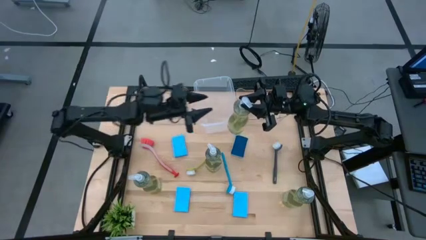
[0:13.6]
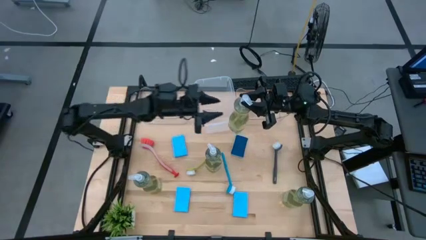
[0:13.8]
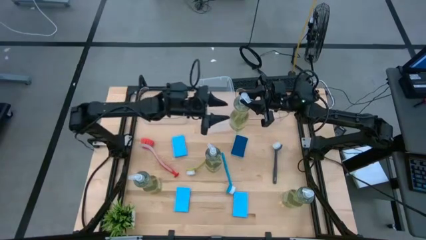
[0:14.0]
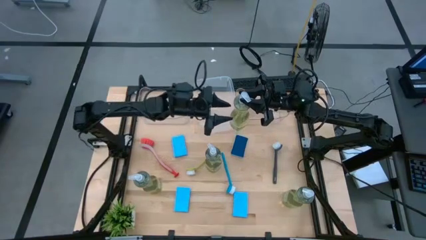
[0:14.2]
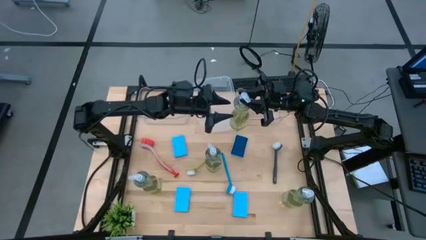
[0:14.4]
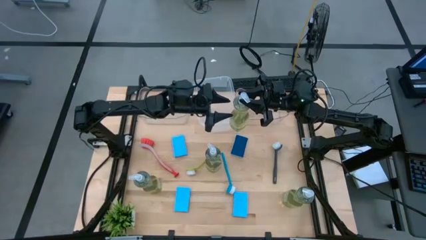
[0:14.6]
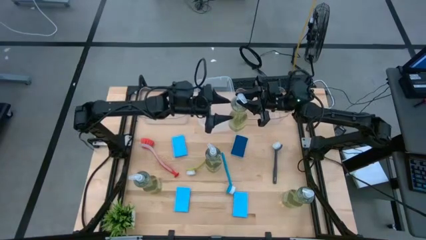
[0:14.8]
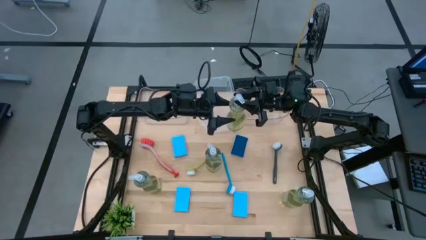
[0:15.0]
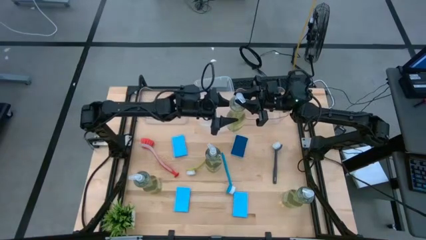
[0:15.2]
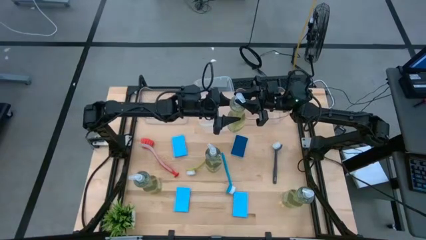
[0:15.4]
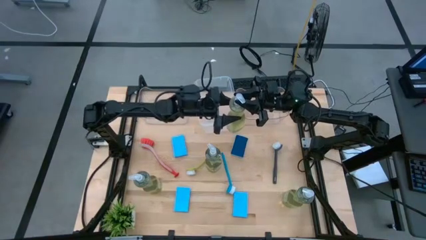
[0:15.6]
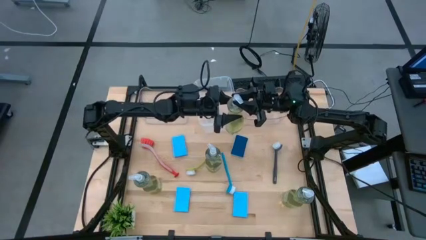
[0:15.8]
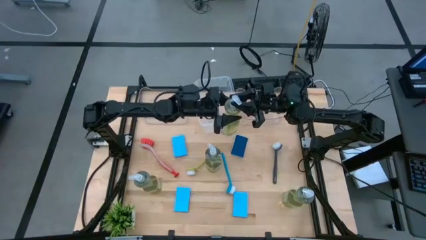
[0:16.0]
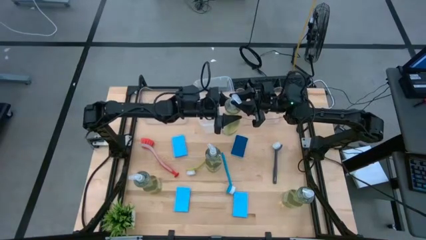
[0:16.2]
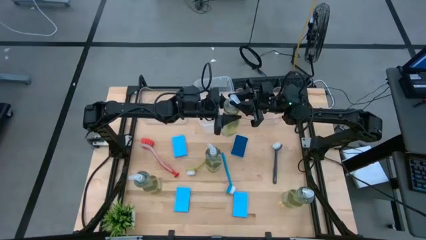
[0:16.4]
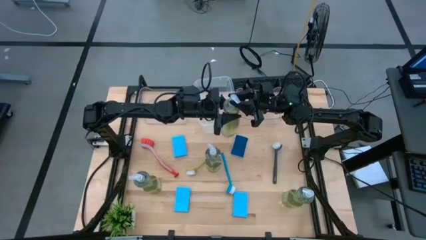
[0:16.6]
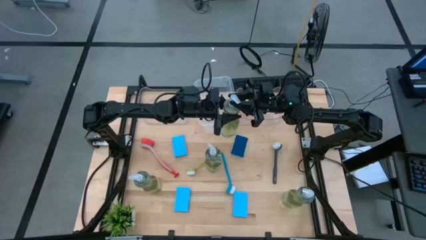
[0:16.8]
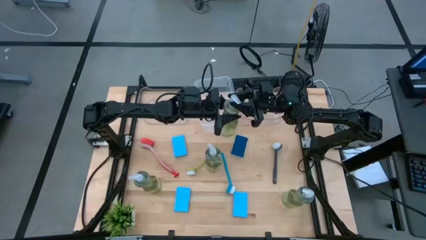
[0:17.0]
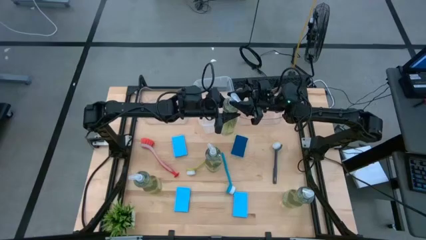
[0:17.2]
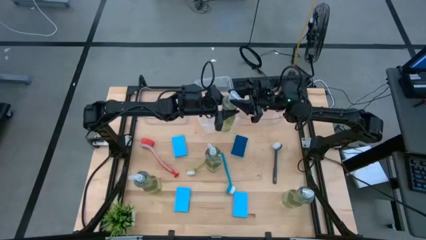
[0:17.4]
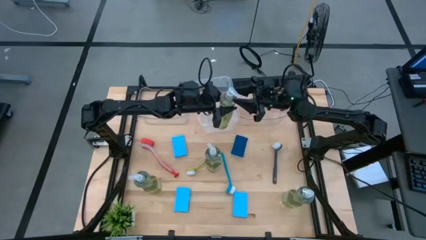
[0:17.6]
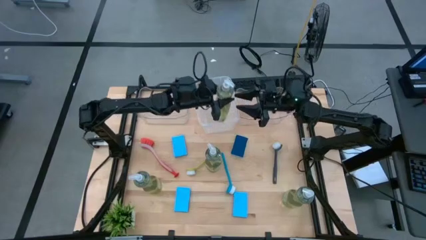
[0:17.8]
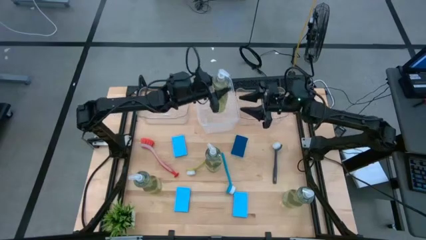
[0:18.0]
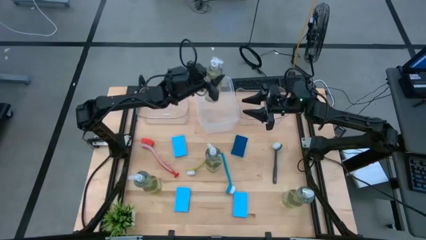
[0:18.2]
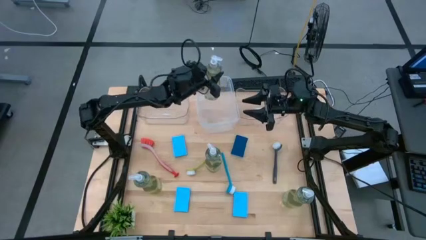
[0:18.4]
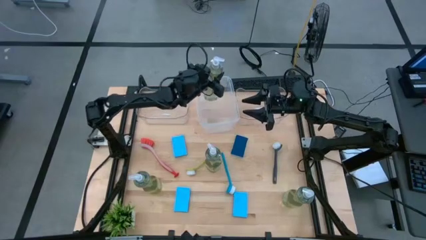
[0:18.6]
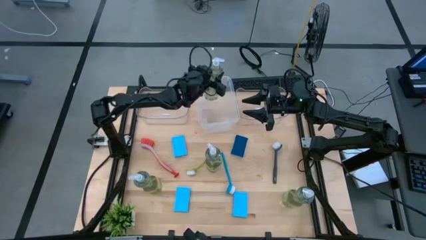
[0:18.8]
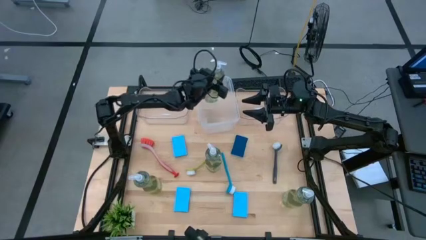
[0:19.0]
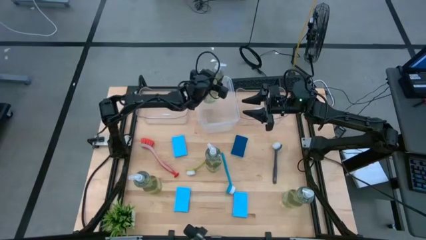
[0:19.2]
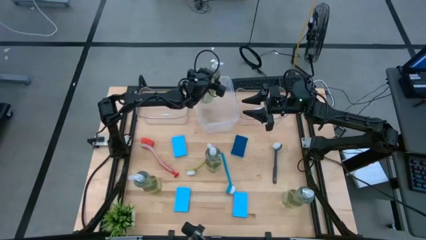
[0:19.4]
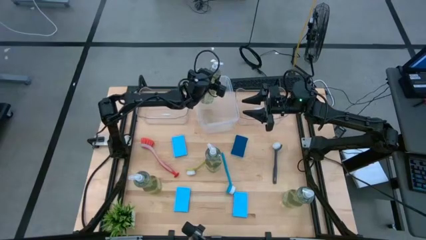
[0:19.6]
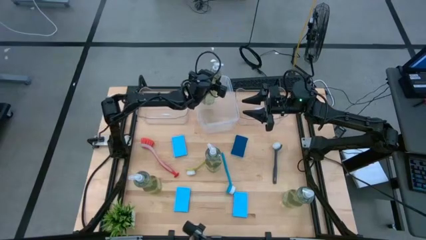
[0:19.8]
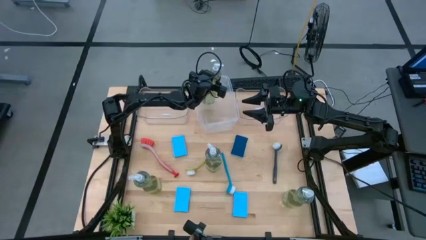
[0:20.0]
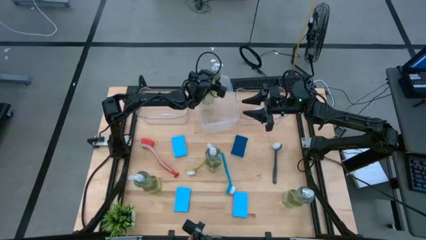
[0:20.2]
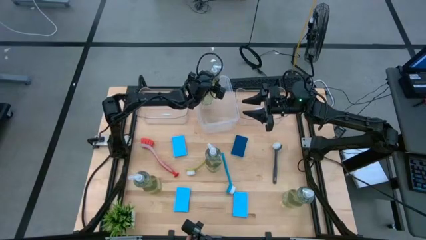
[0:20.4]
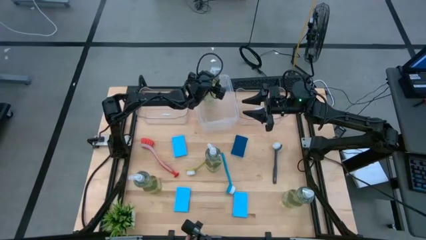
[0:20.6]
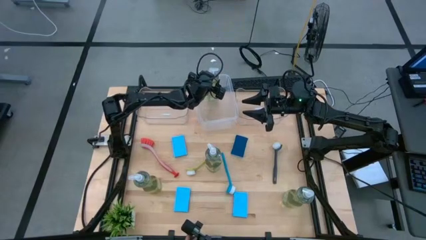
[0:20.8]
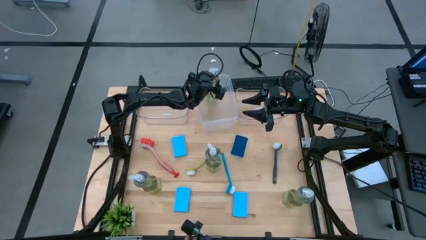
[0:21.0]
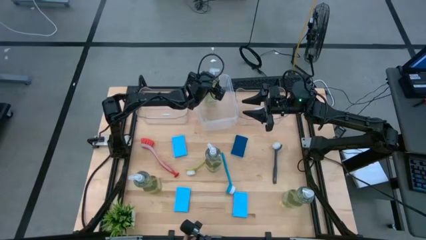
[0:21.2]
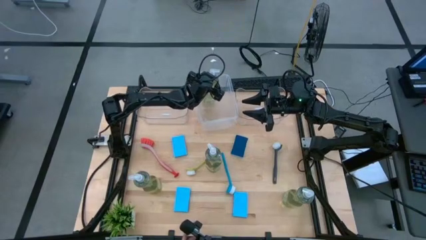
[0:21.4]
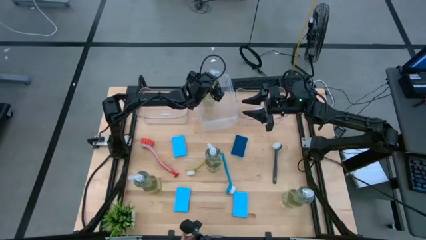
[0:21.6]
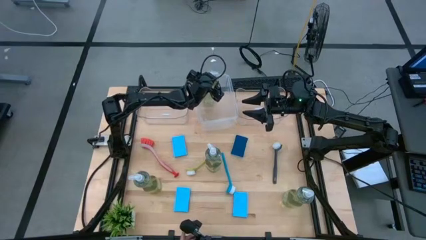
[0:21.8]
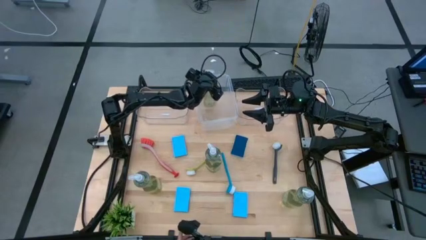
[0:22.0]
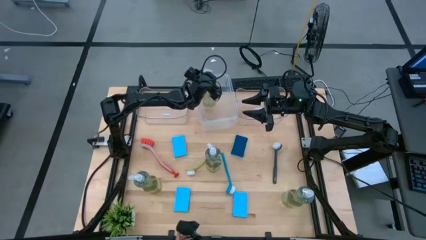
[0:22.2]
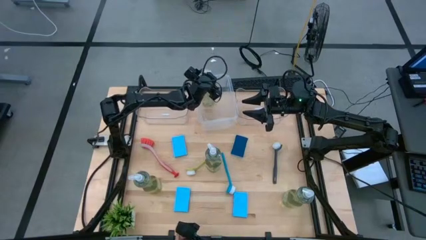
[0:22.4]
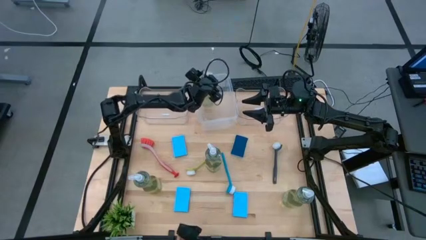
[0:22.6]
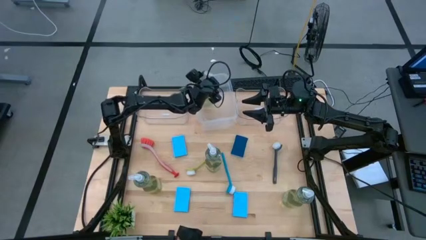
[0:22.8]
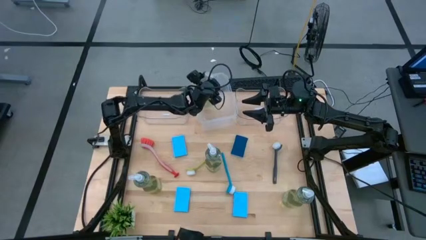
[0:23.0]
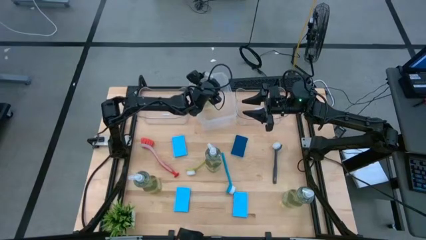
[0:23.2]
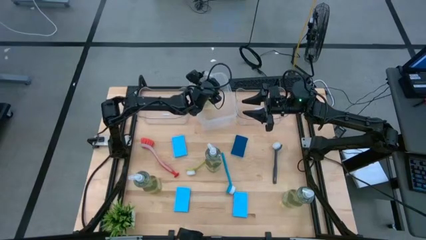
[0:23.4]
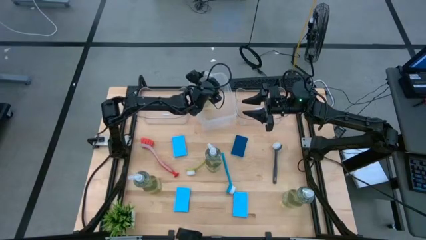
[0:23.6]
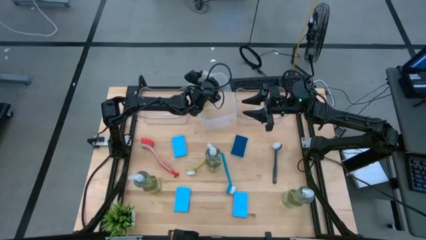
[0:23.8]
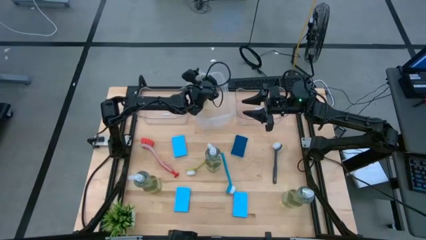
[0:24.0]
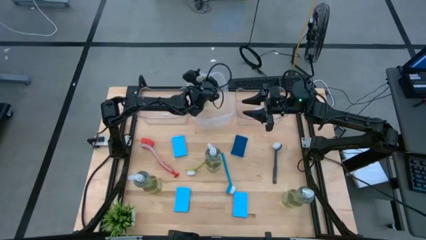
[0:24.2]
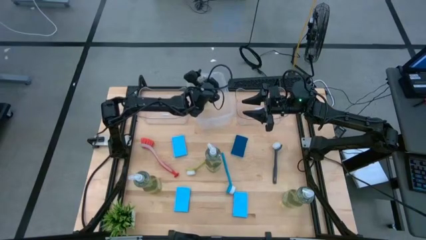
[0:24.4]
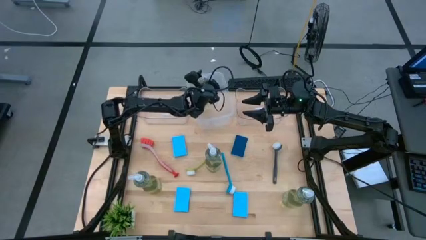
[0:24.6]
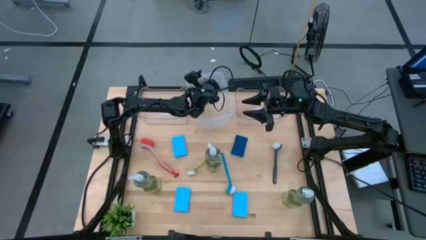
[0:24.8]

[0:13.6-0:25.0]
Task: Pick & Place Kitchen Sink Supplies
Put the green soap dispenser into the transparent white bin

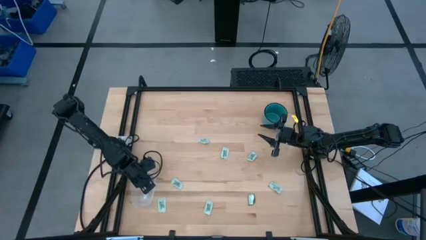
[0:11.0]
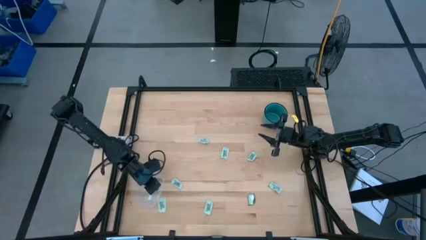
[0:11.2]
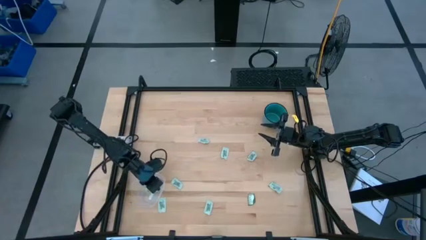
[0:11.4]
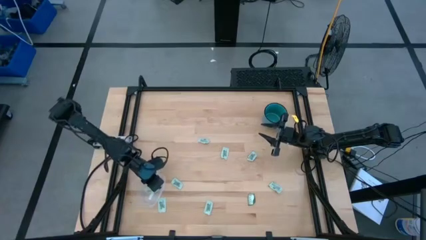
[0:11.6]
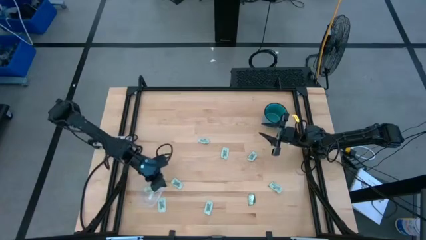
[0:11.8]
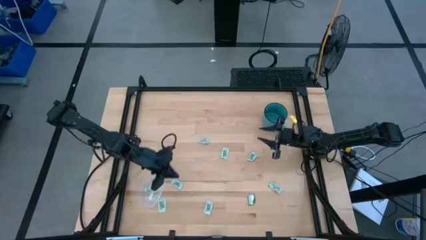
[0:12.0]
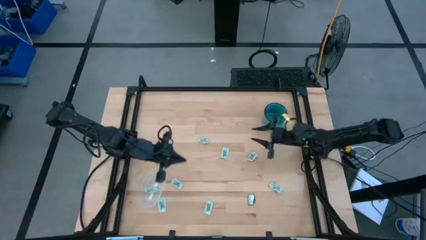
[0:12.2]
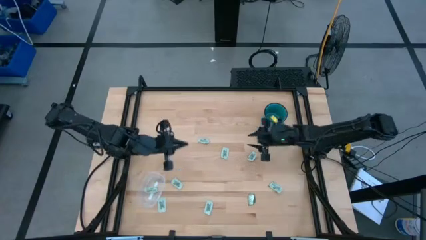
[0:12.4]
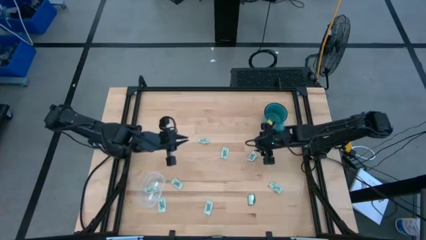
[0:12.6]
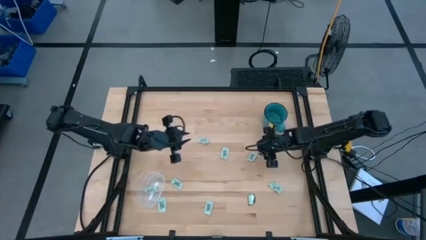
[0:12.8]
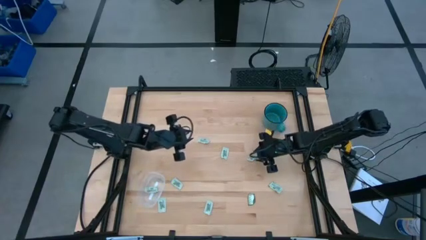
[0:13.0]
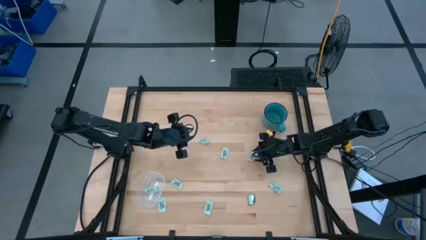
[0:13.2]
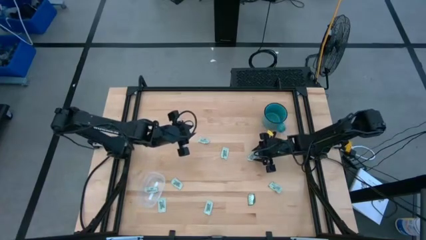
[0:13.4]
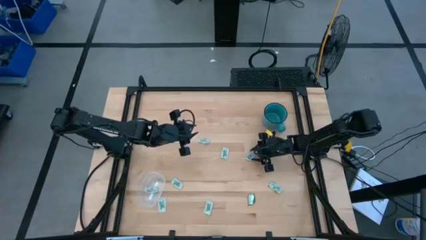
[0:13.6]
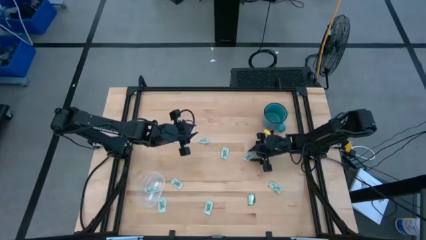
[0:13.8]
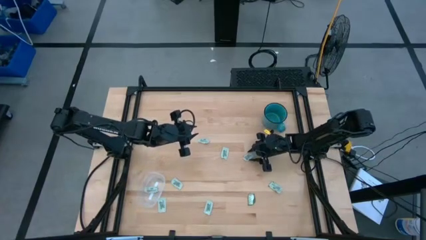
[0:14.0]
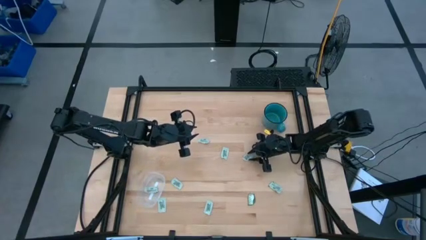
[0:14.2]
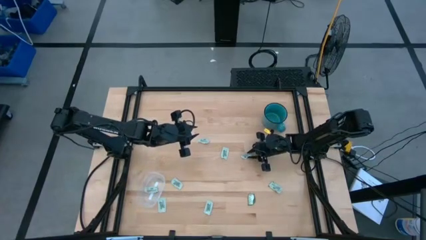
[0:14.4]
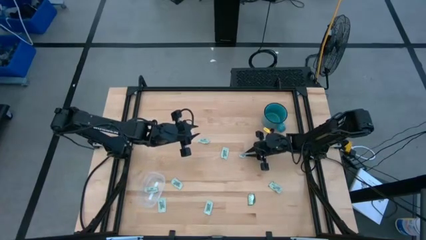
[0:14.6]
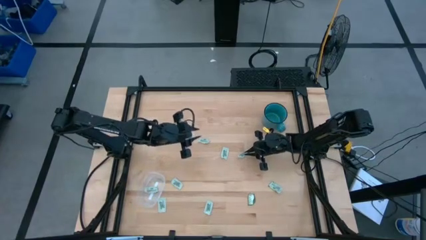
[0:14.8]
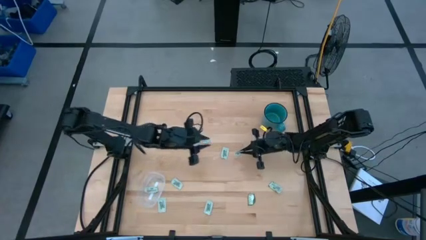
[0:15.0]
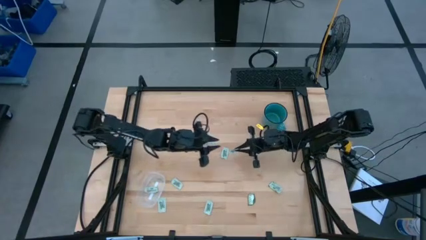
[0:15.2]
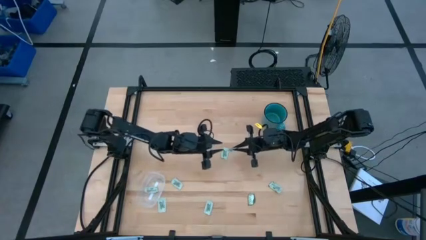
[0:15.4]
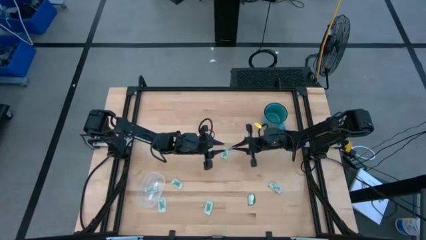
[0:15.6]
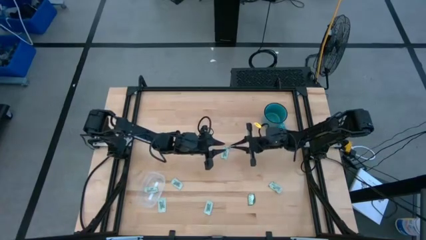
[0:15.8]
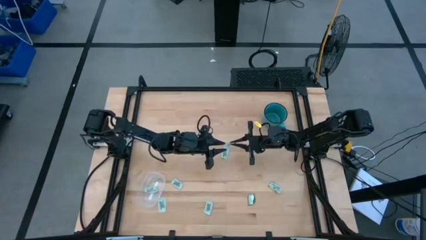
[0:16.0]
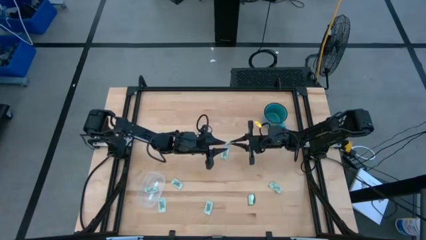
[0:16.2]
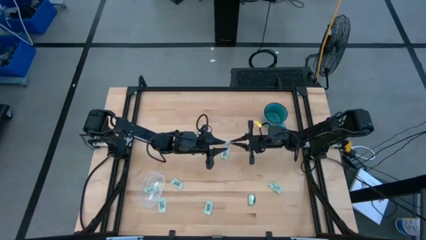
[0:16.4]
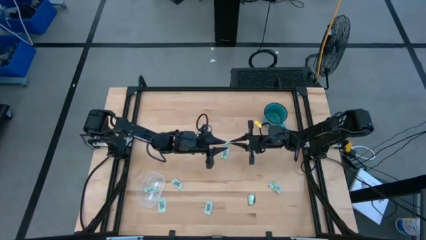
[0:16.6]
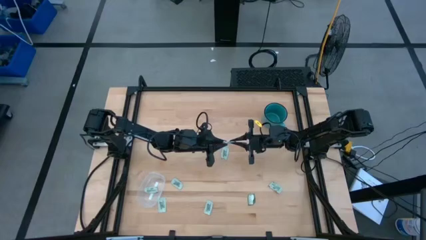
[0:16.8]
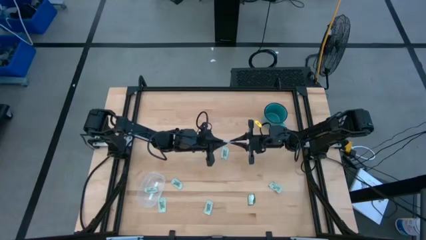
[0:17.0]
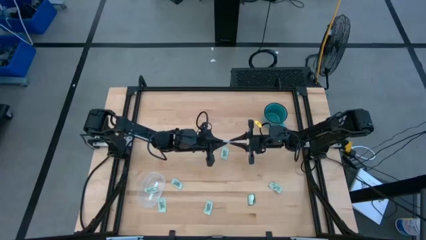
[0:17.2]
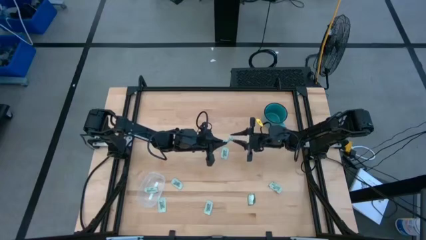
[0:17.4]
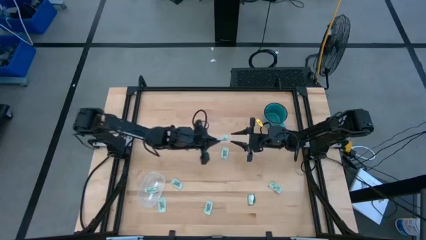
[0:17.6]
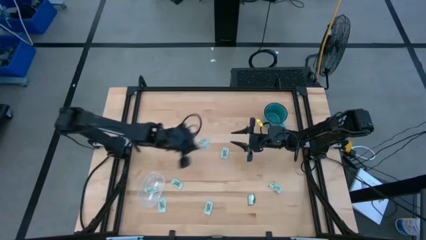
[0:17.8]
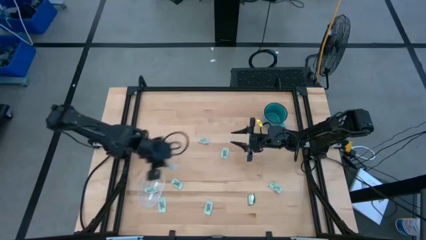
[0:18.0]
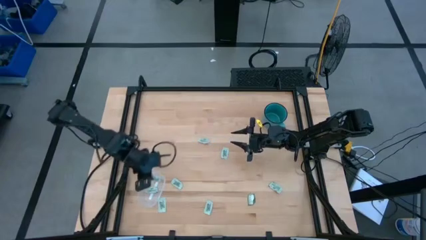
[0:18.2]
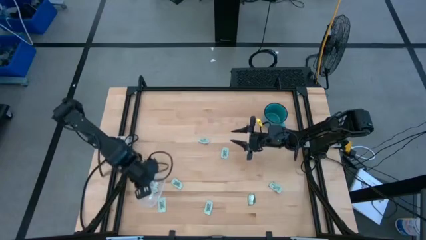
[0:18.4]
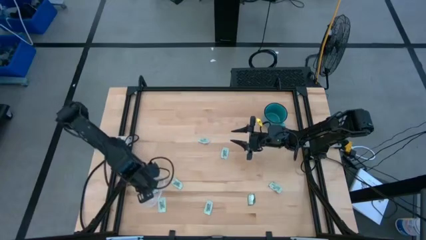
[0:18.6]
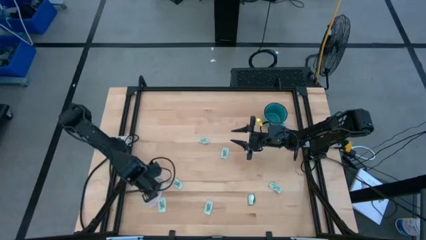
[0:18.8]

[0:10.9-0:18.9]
Task: Pick and place Stevia / Truvia into bins
Put the white stevia packet into the transparent bin
